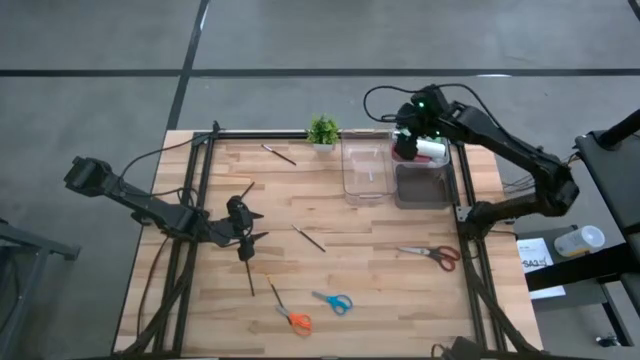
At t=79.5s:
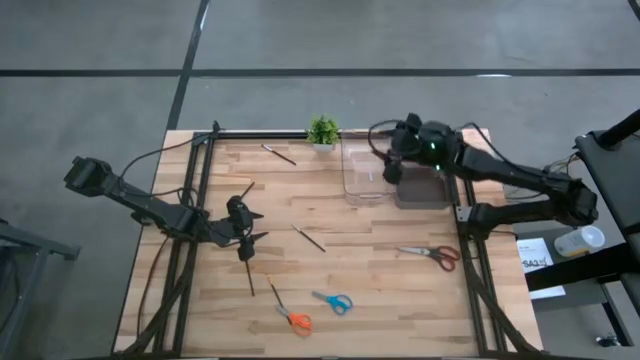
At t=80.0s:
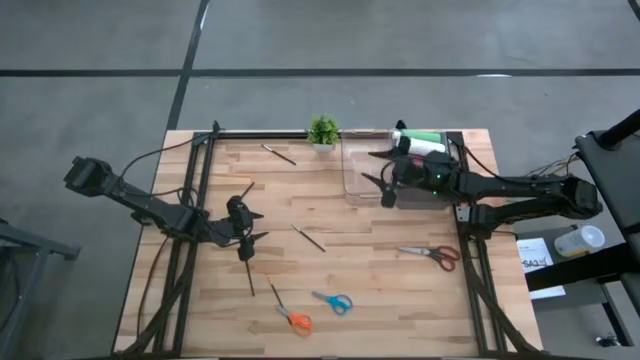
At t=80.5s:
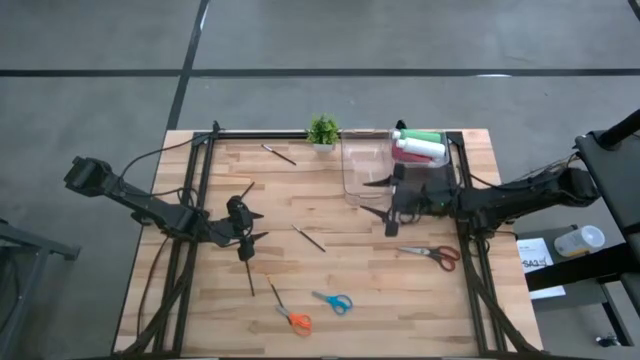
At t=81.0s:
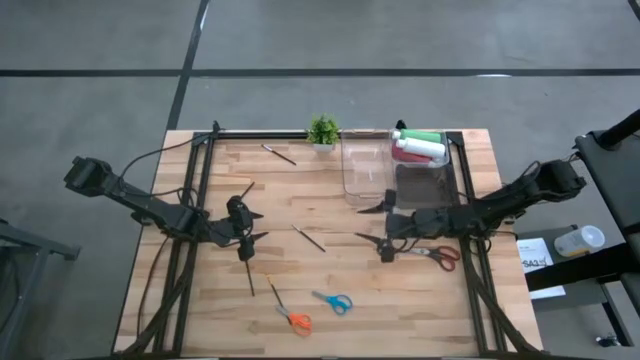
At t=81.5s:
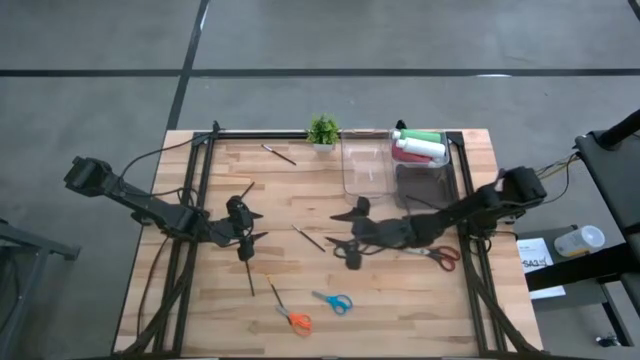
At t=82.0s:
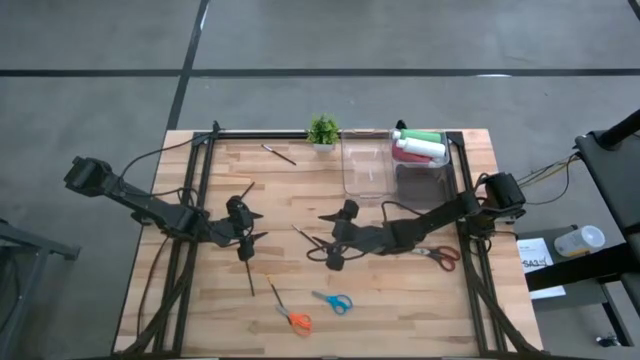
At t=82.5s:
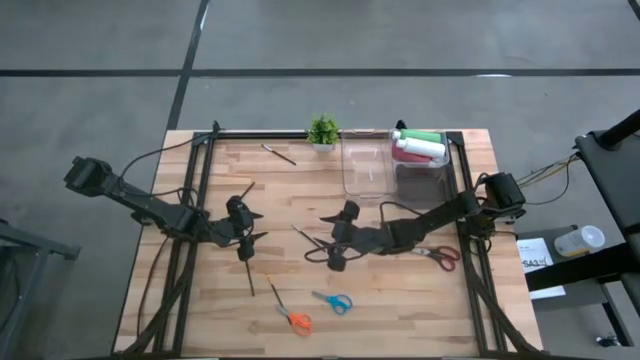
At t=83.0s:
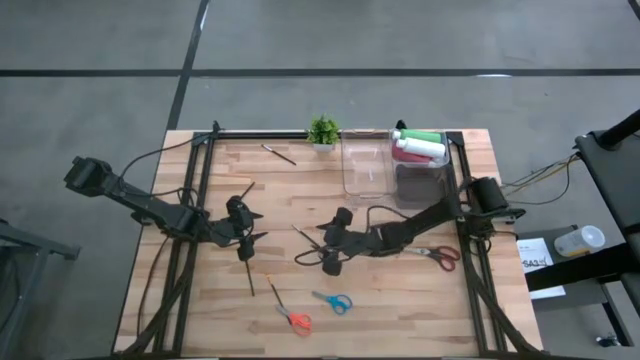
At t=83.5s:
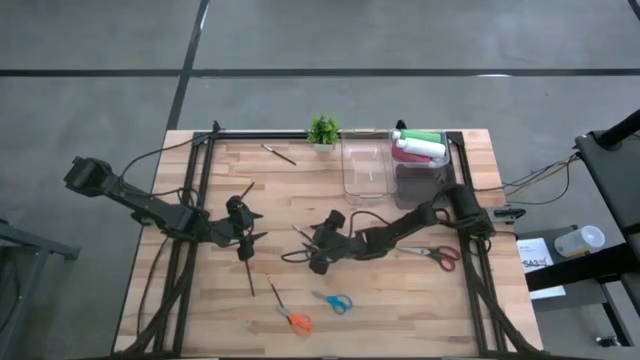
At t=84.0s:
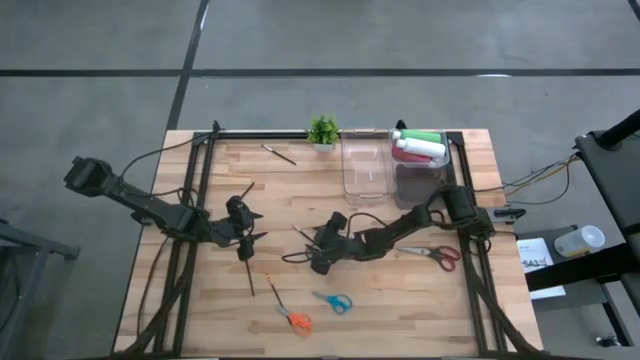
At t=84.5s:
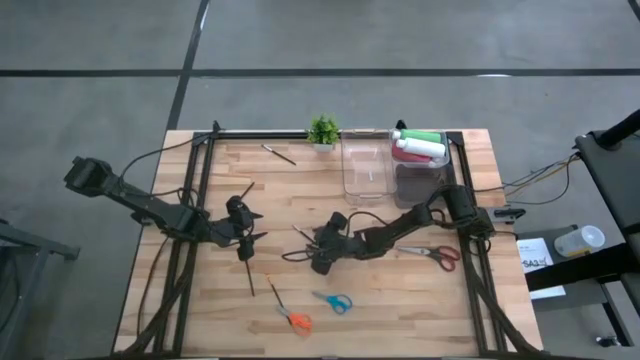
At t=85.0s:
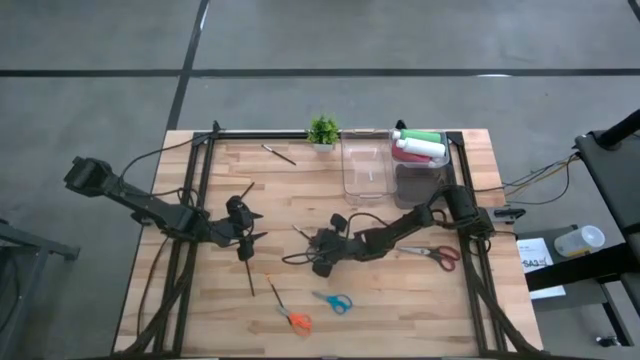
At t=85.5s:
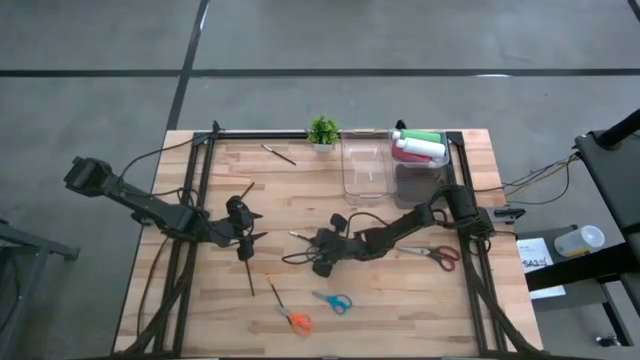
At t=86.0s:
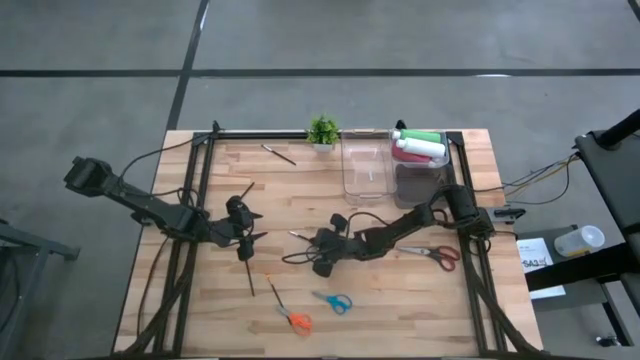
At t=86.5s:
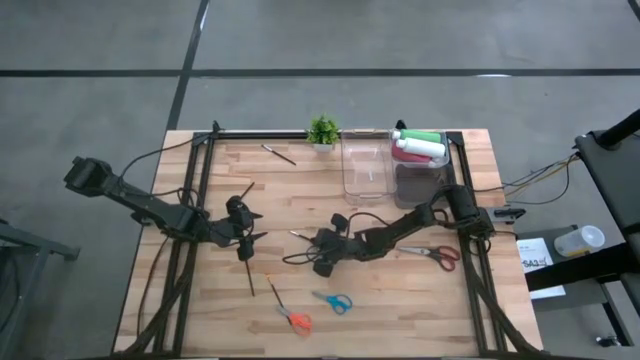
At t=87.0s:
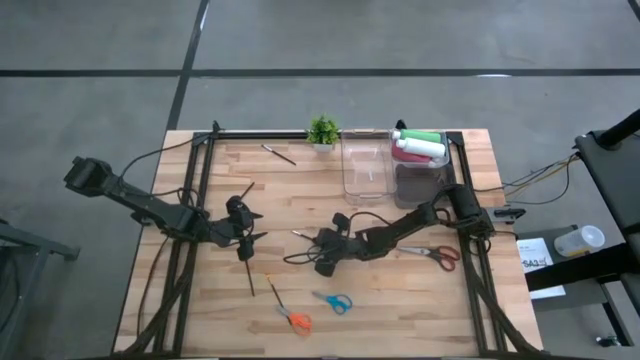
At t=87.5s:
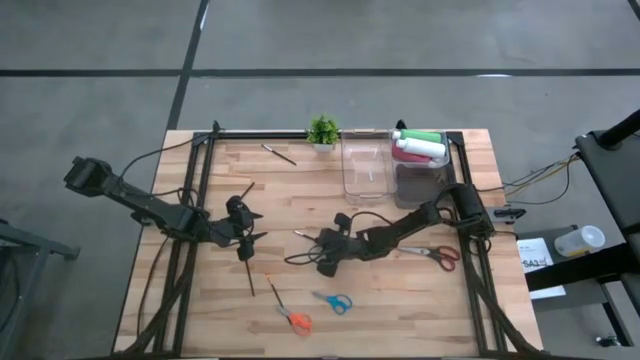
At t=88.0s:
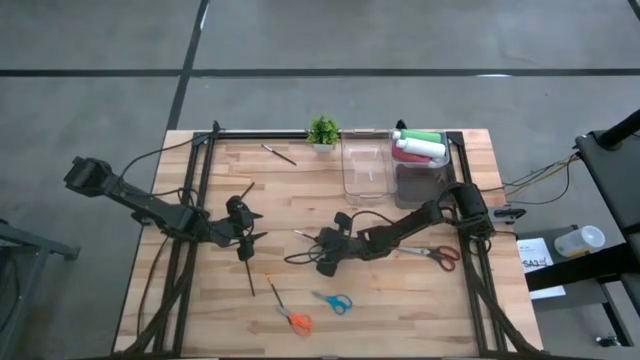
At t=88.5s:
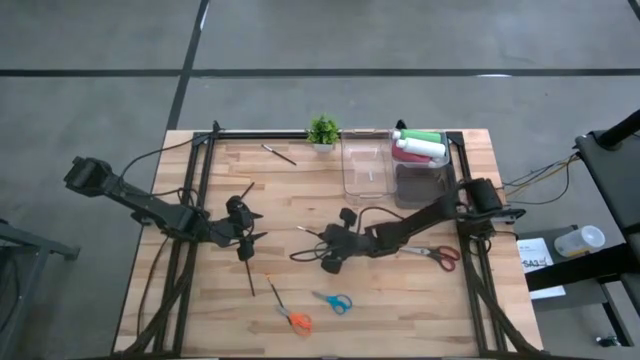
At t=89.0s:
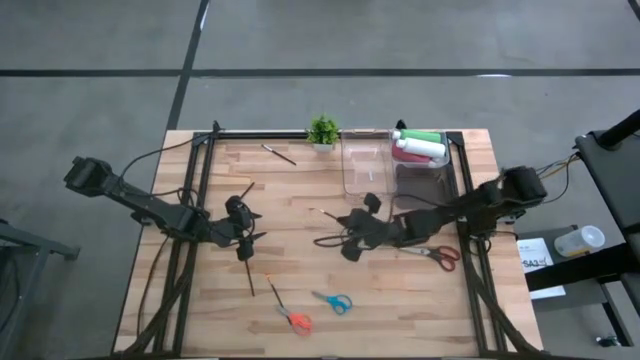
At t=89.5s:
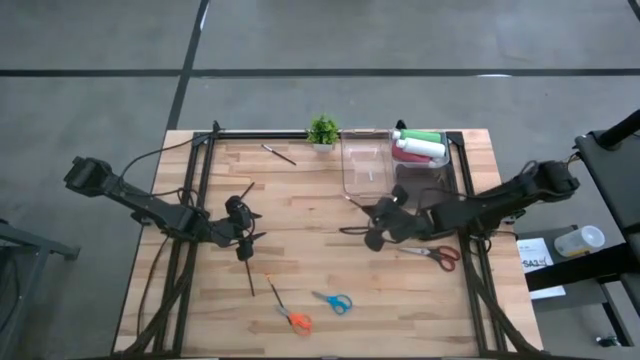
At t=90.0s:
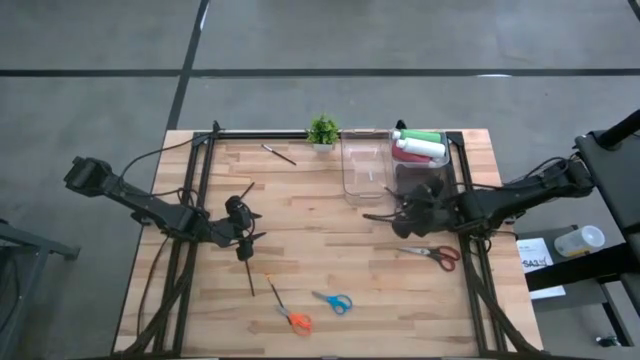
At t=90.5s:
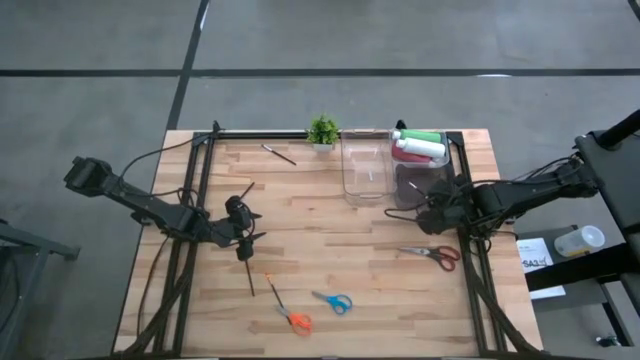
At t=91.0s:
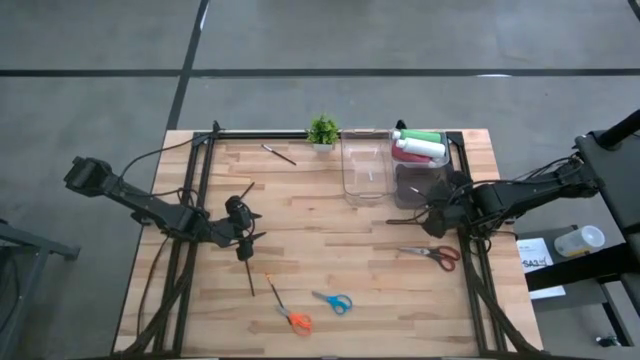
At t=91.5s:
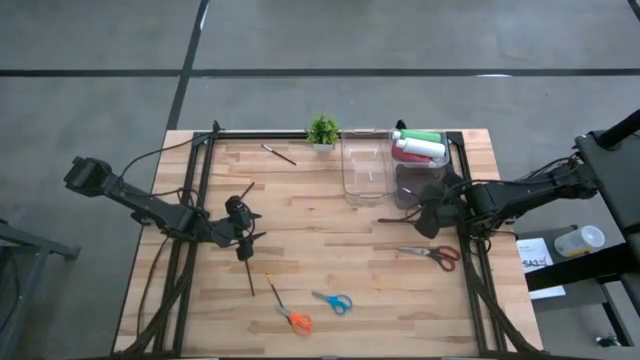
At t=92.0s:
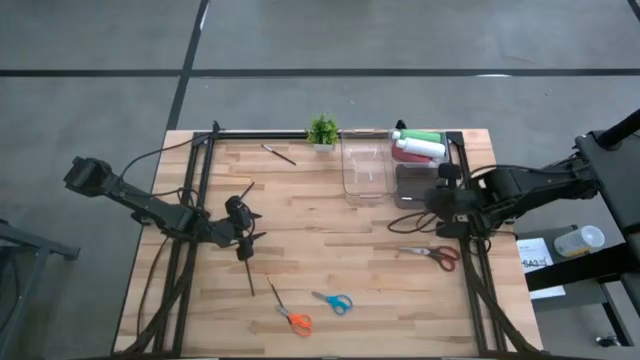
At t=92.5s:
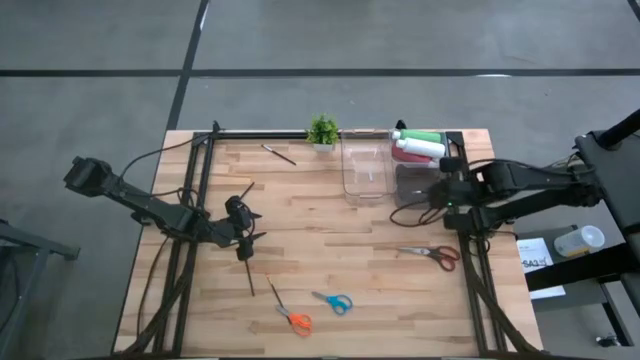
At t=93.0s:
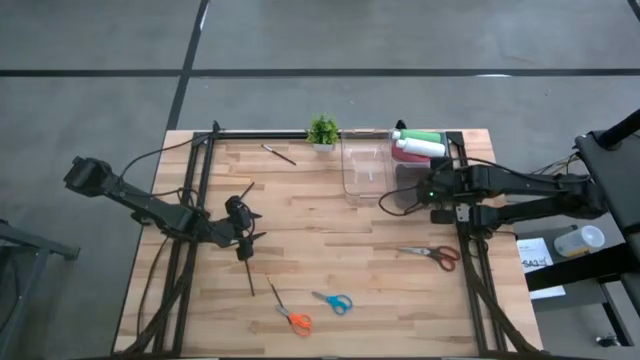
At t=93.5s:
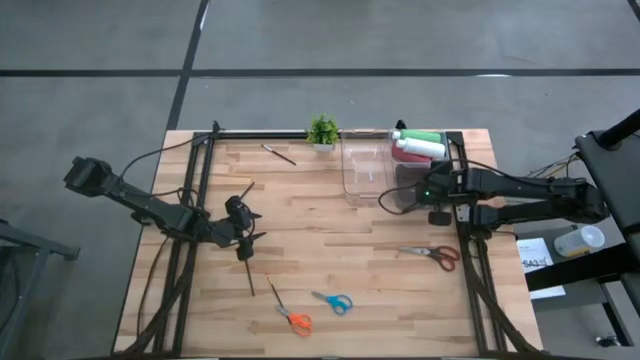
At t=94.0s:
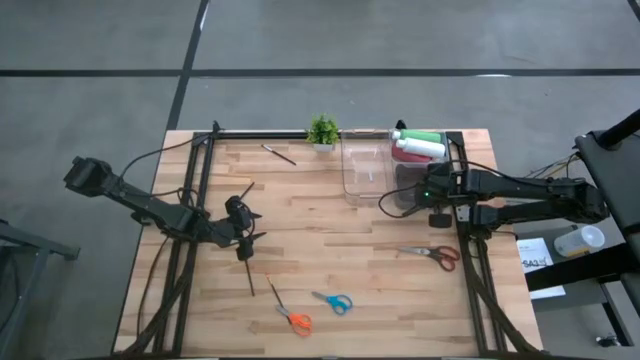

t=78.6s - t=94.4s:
Task: Pick & Place Paint Supplies
Put the bottom silver paintbrush into the black bin

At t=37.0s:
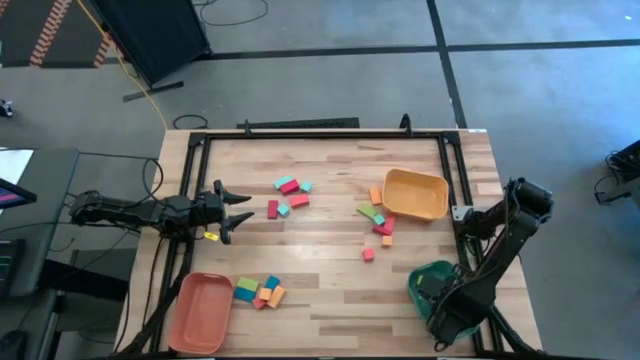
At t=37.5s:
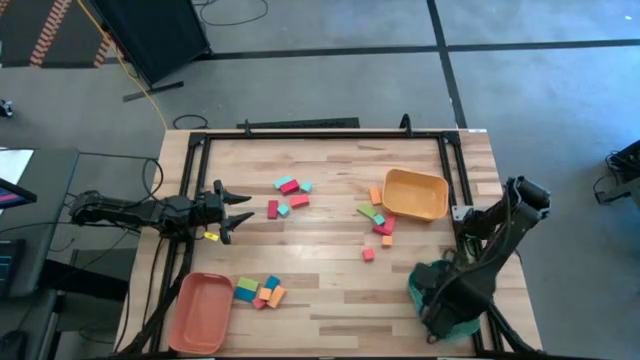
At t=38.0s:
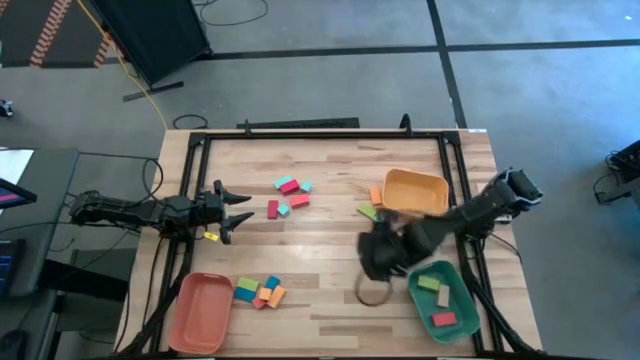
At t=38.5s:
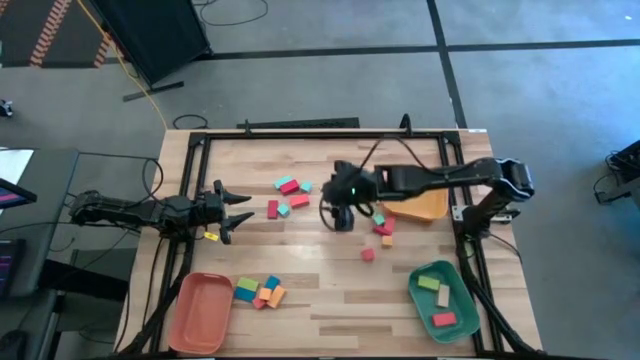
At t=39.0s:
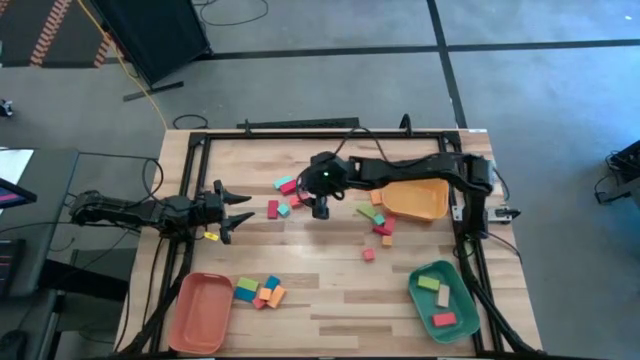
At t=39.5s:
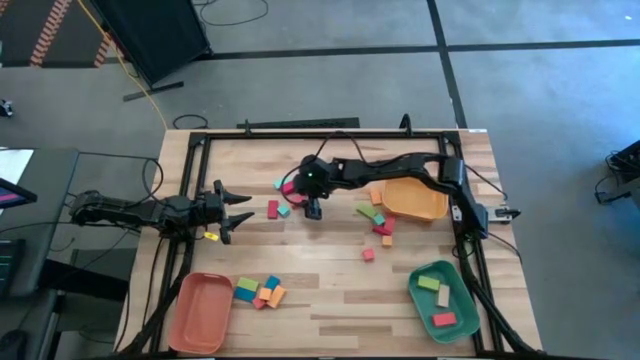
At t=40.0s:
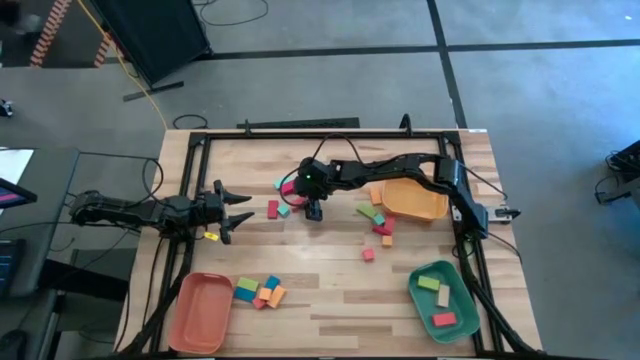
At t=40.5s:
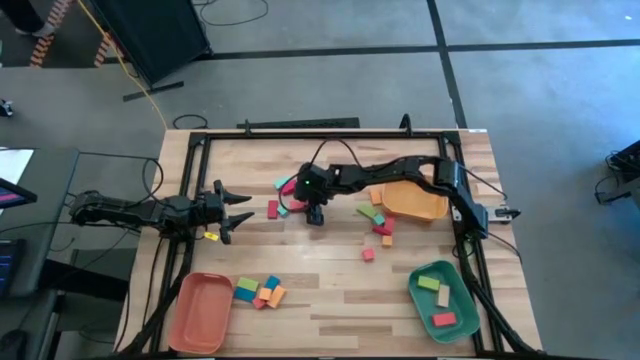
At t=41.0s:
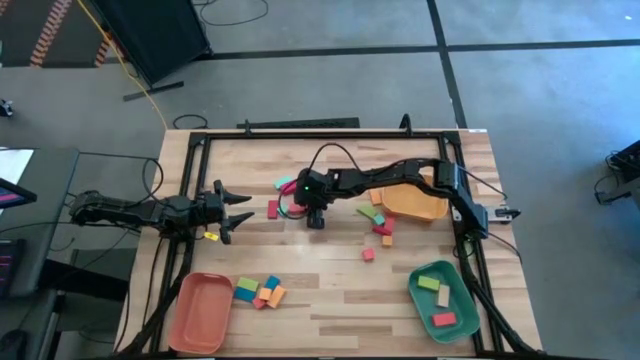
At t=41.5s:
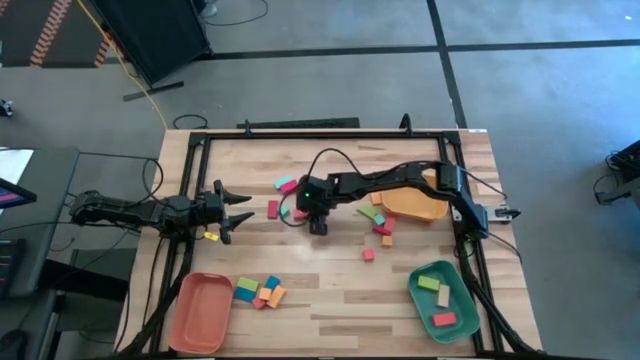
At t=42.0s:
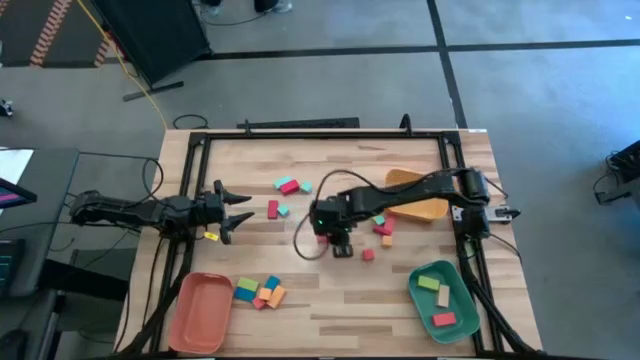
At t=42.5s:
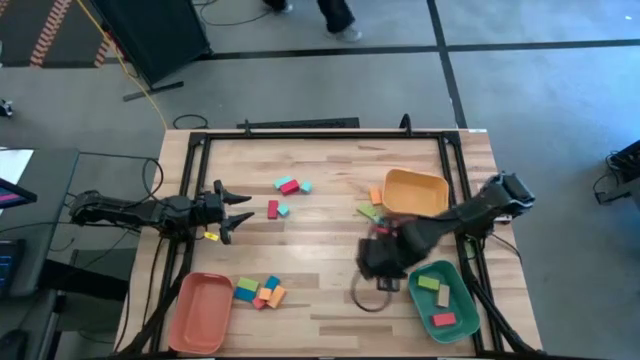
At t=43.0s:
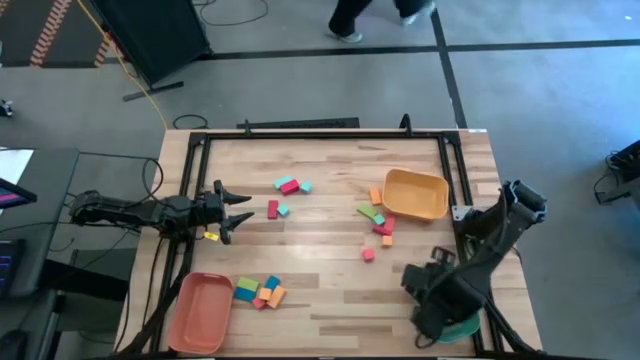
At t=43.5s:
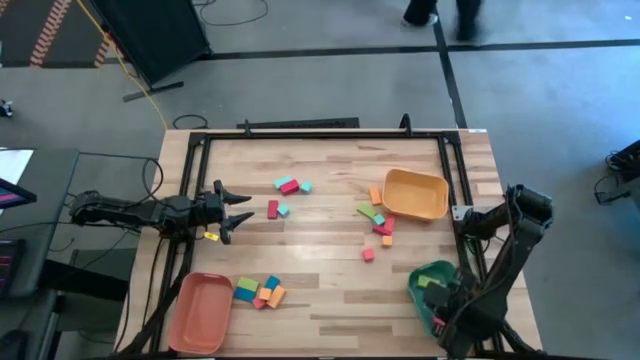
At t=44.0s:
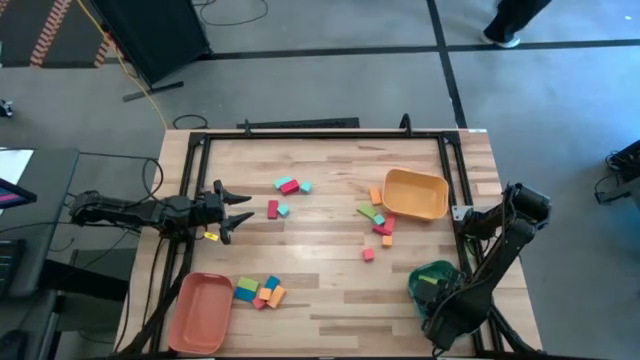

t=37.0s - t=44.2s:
Task: Sort blocks by size
Put the large orange block into the green bin
